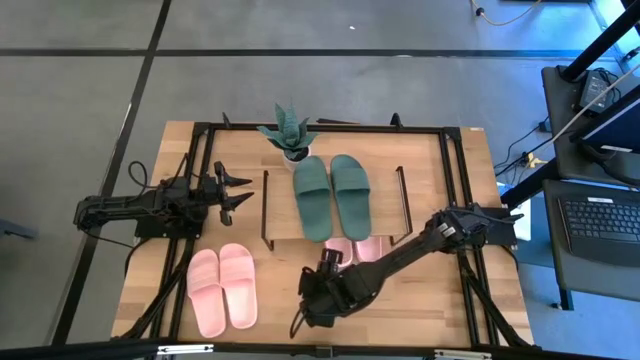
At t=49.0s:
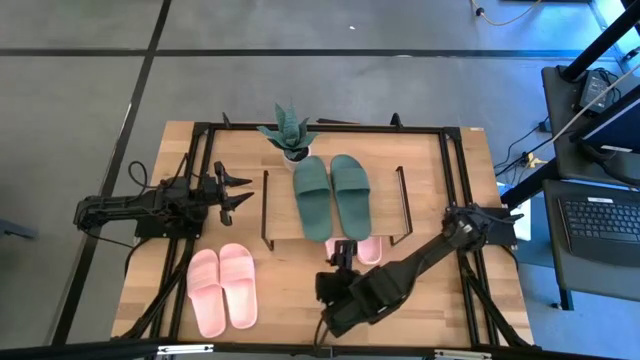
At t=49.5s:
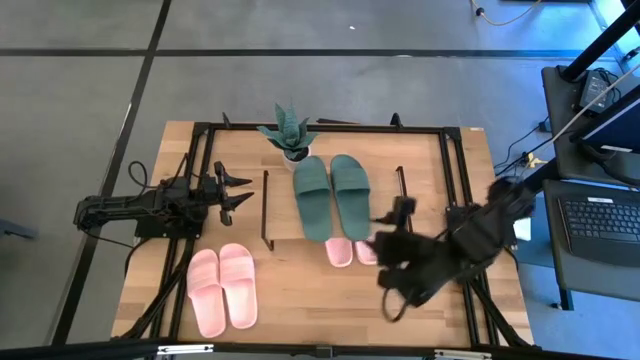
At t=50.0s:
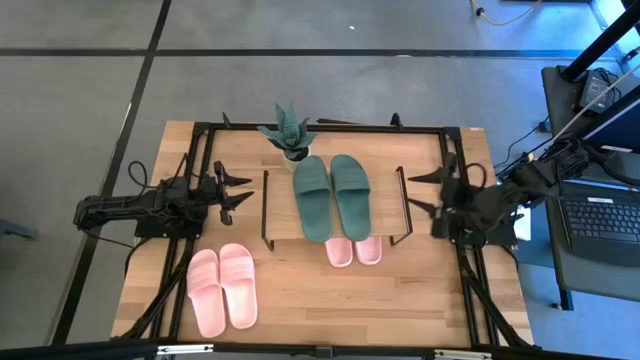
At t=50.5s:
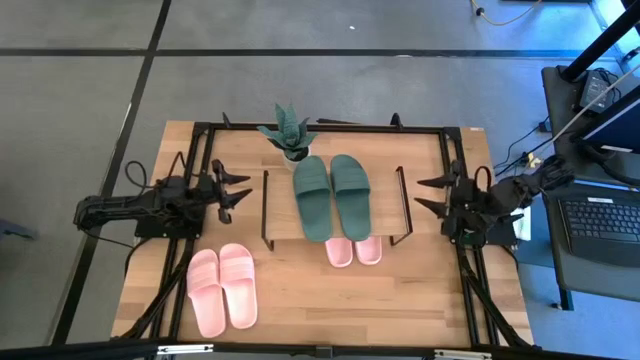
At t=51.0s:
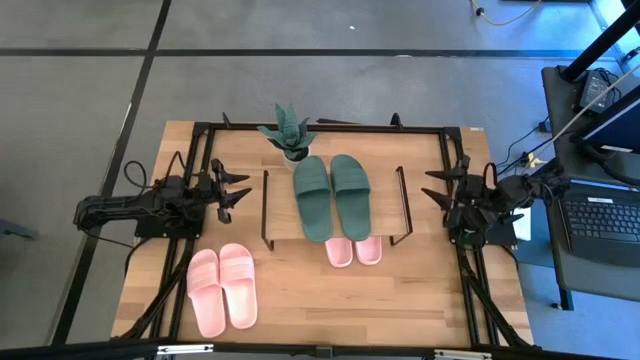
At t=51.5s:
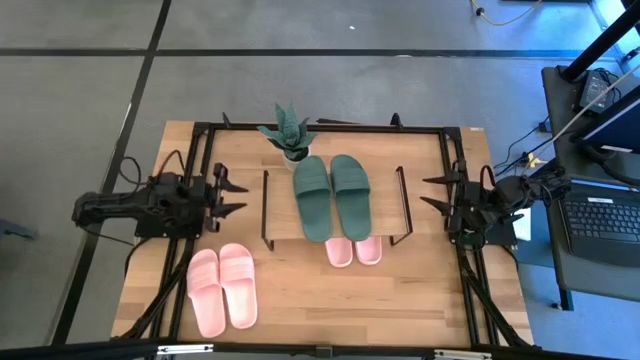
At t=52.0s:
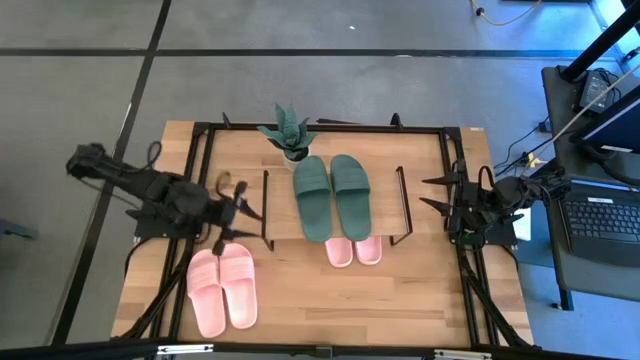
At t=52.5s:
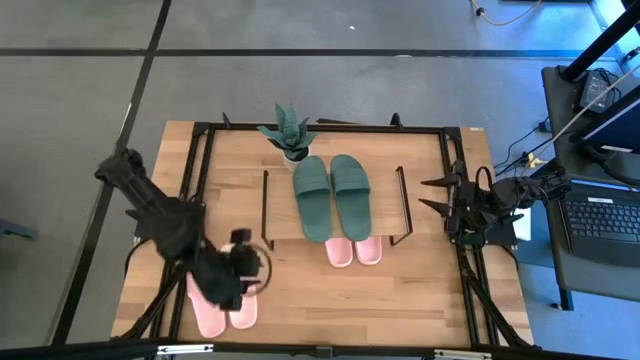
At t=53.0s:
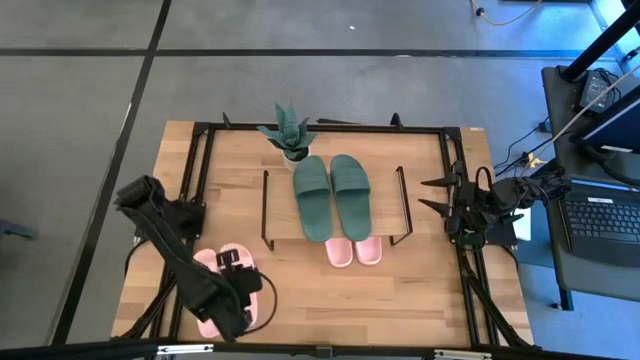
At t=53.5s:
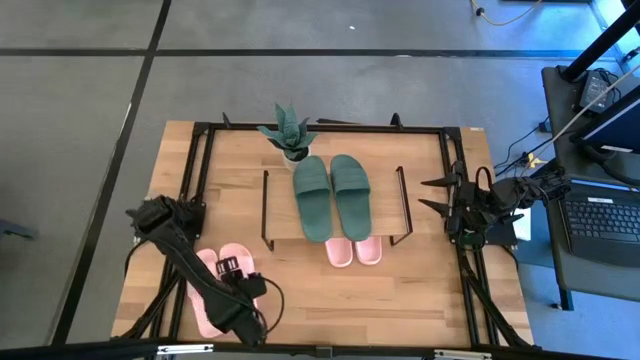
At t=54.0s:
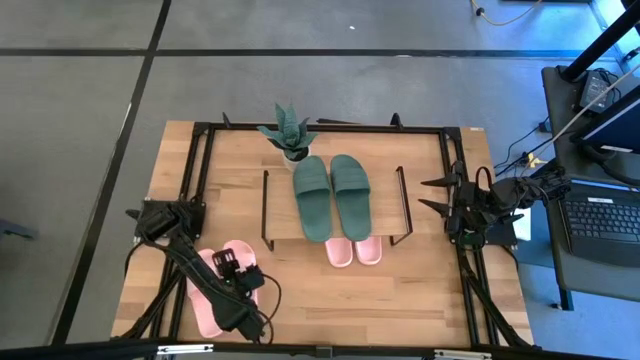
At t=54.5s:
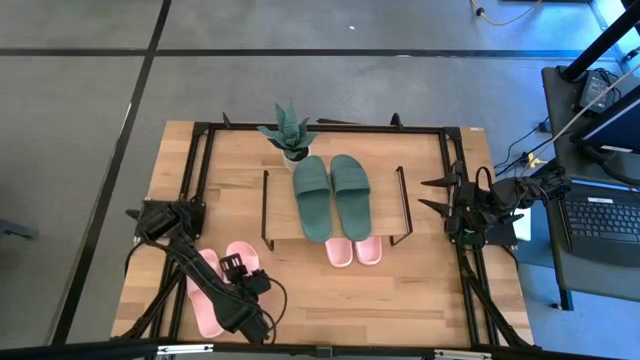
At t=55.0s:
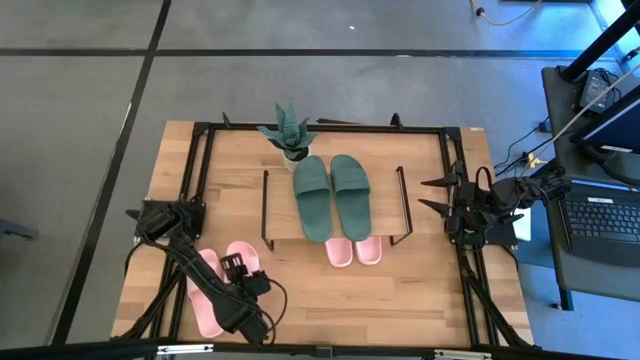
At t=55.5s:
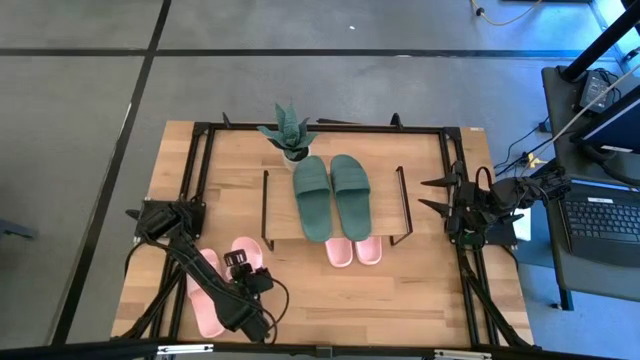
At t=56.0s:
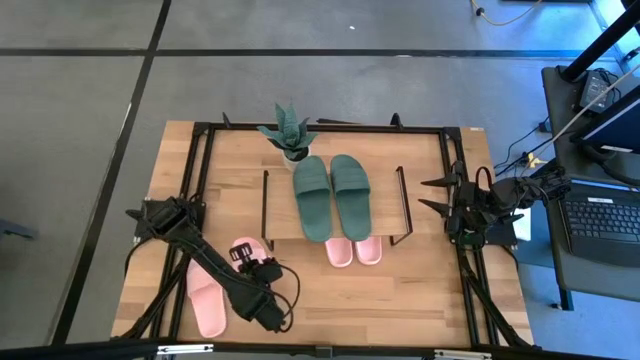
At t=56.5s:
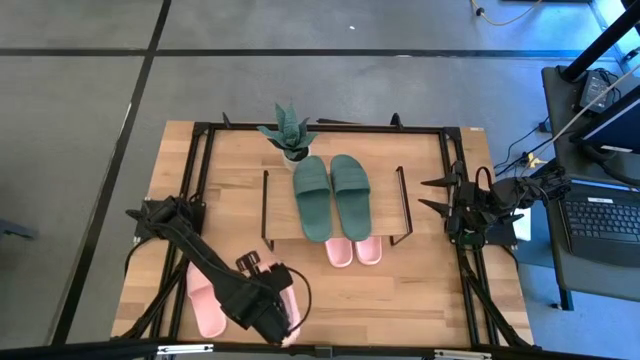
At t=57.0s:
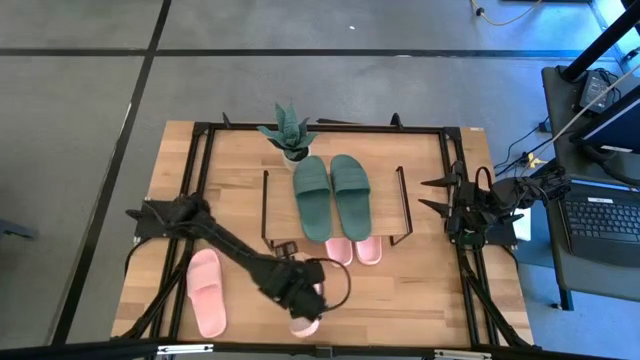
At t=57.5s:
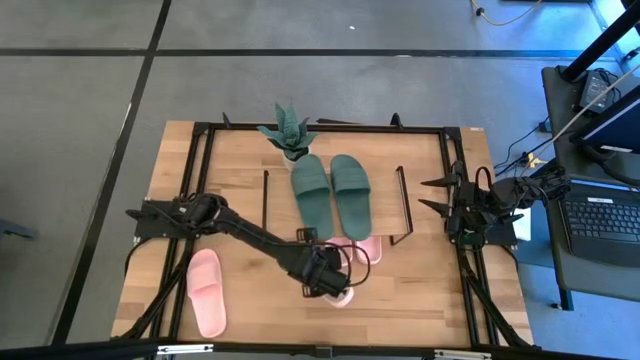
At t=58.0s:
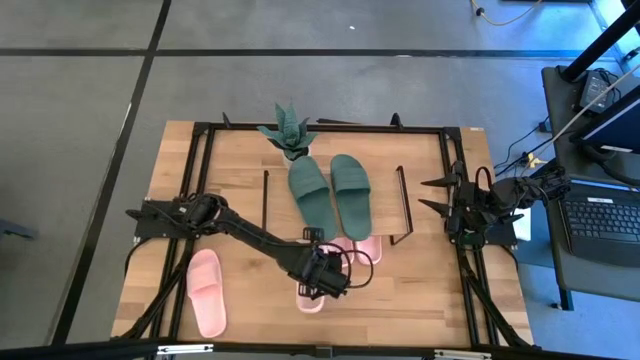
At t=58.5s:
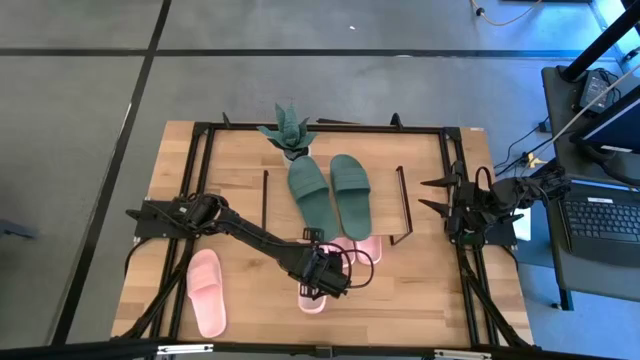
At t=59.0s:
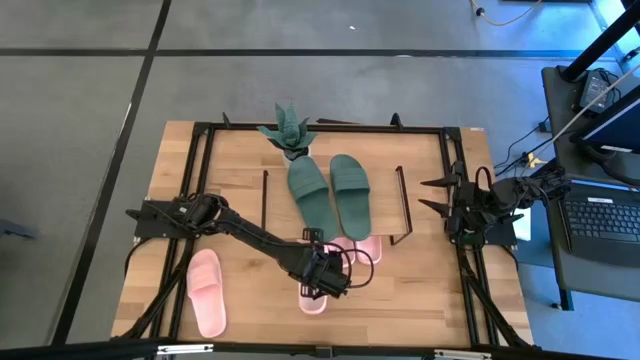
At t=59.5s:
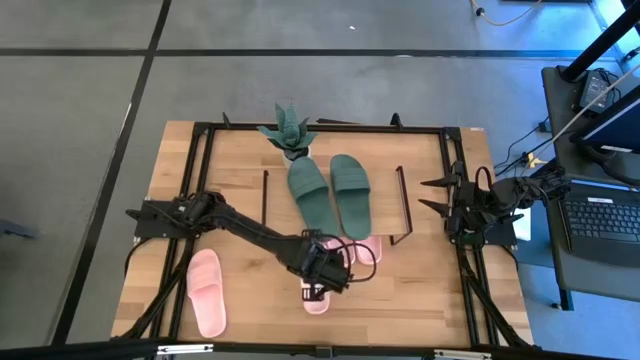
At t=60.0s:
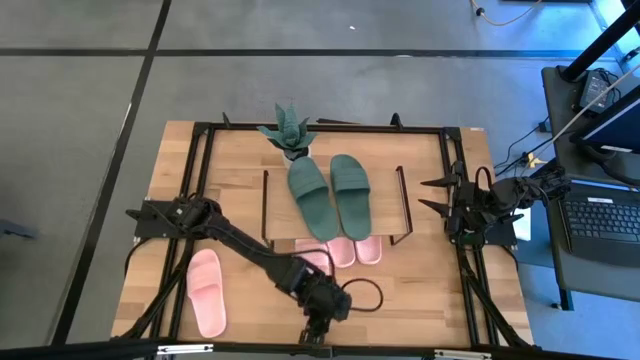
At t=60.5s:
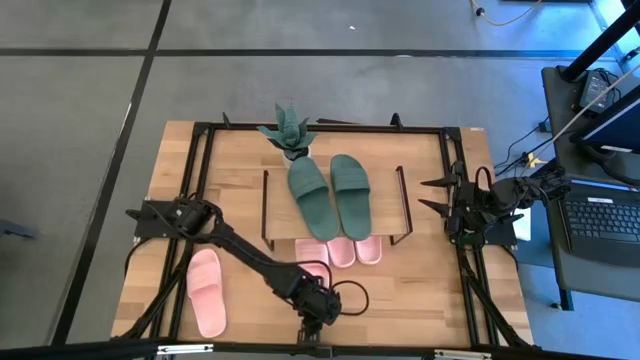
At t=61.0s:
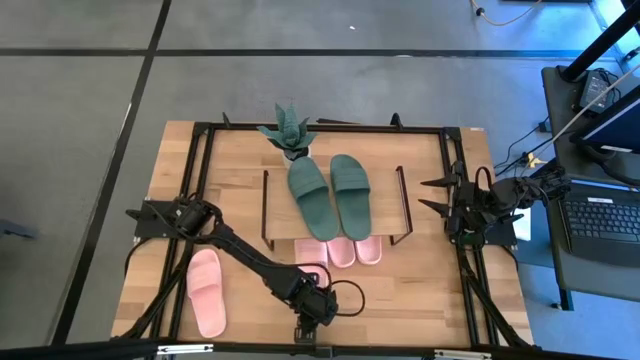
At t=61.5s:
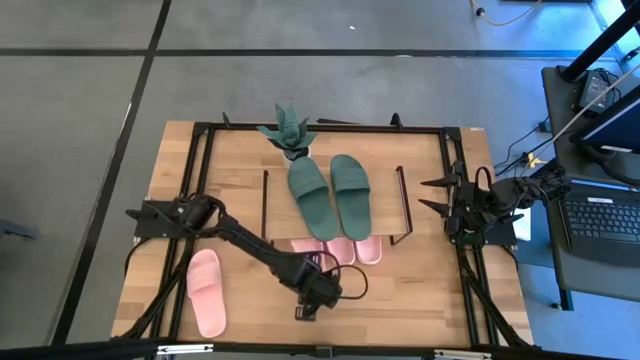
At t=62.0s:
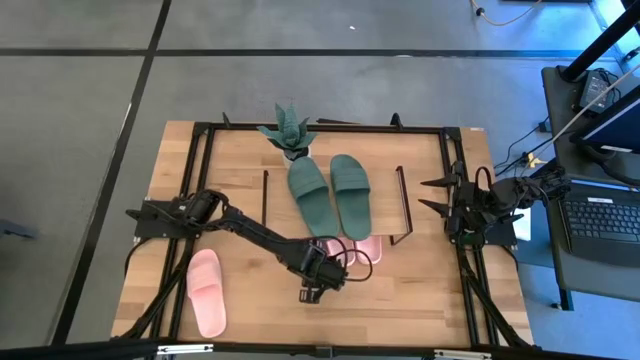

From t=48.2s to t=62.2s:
Task: Pick and place slides into the shelf
Put the right pink slide under the shelf

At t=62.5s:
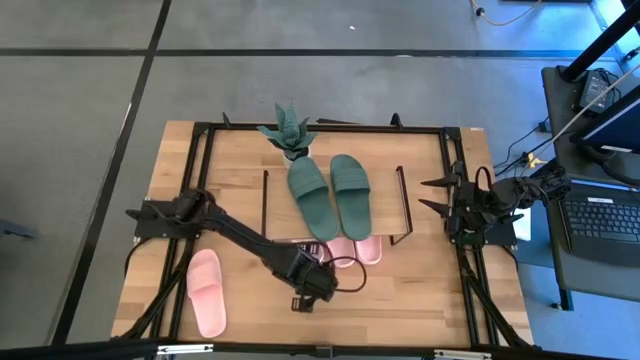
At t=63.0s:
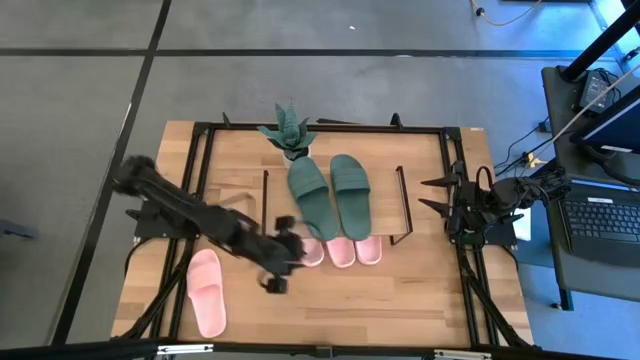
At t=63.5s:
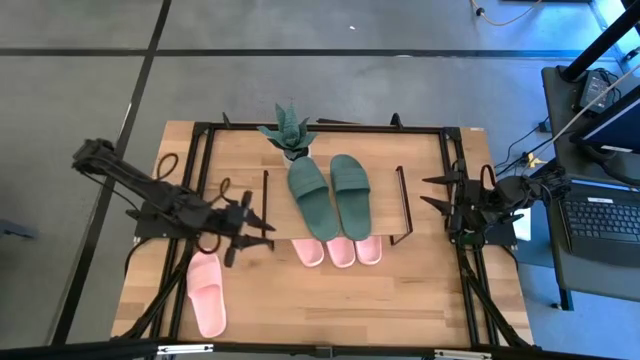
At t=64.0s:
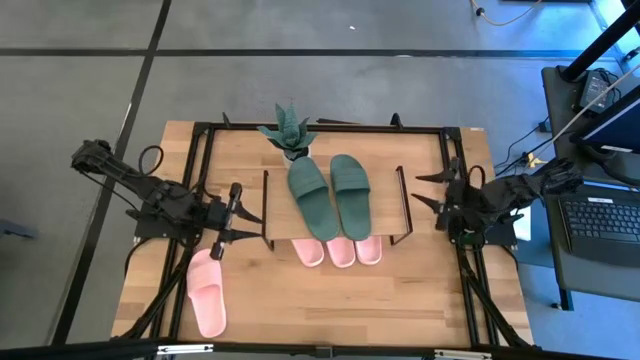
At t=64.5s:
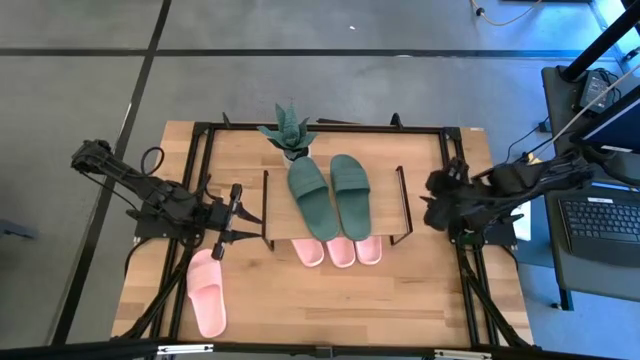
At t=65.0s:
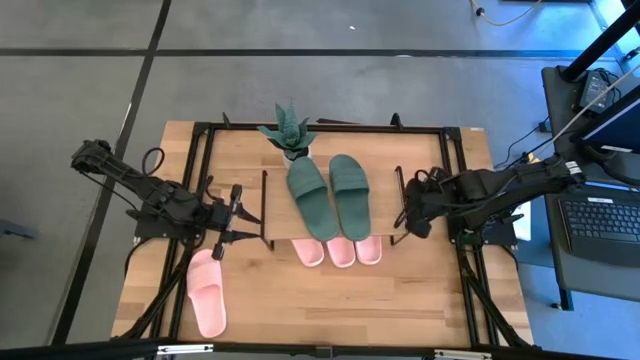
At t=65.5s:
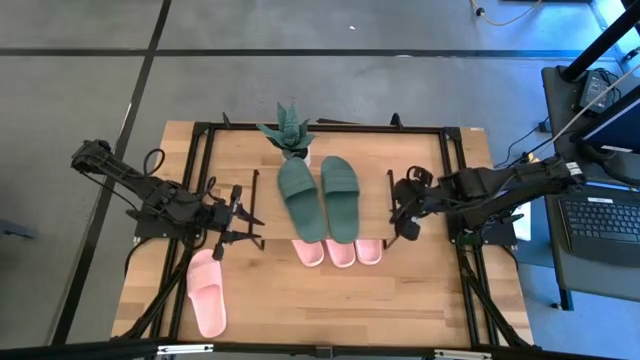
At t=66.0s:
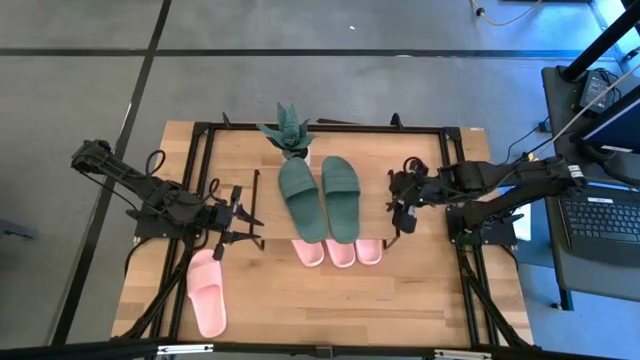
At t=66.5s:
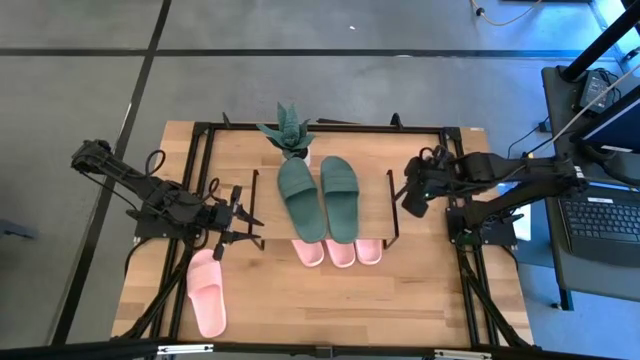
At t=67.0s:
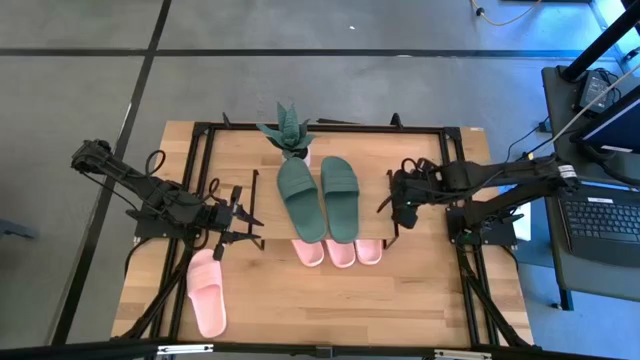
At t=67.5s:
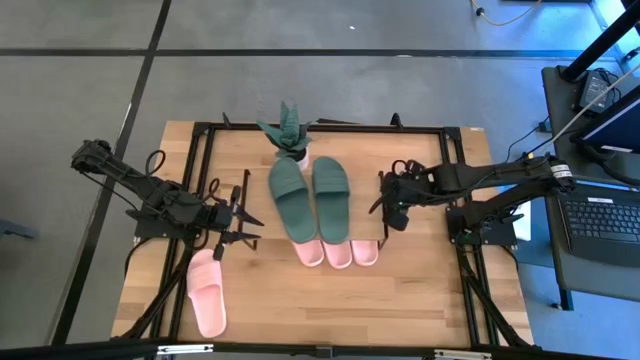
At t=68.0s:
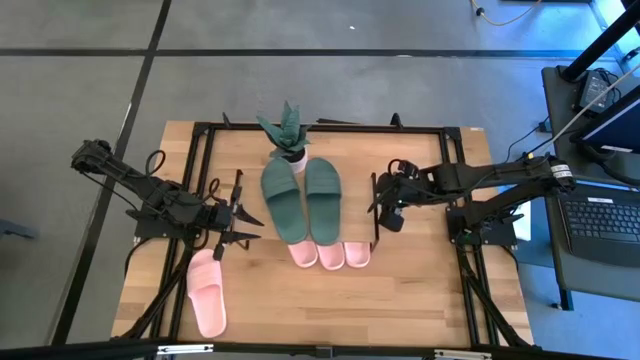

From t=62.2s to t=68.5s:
Adjust the shelf
